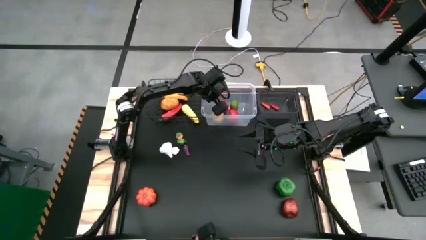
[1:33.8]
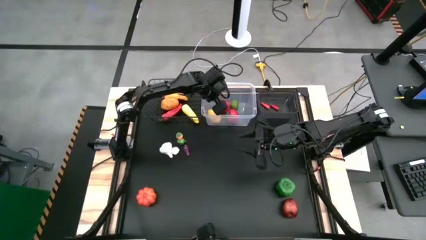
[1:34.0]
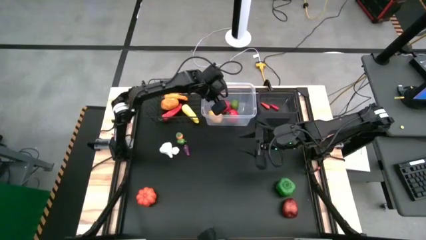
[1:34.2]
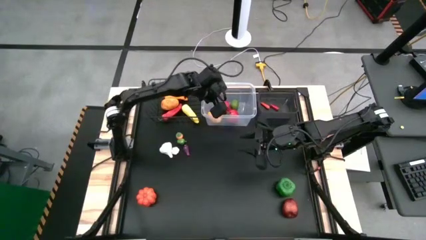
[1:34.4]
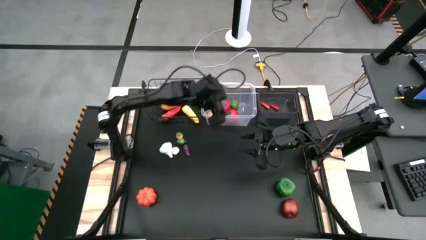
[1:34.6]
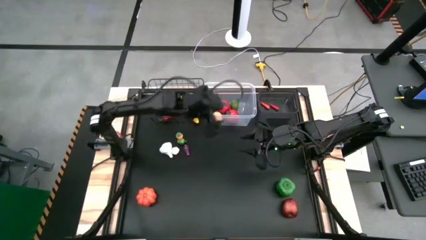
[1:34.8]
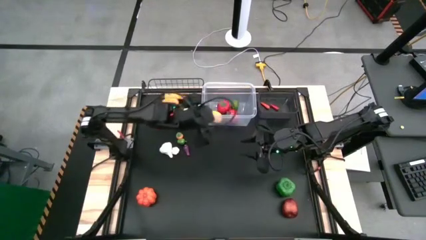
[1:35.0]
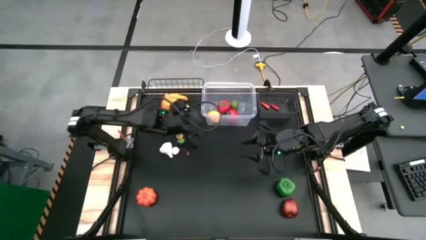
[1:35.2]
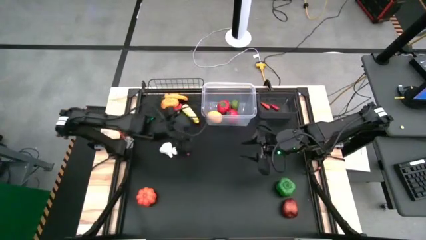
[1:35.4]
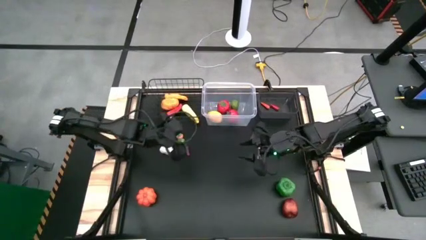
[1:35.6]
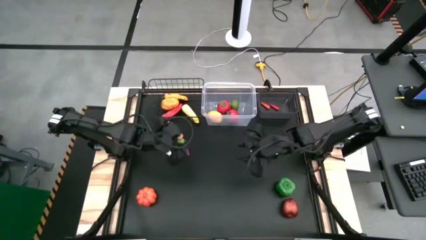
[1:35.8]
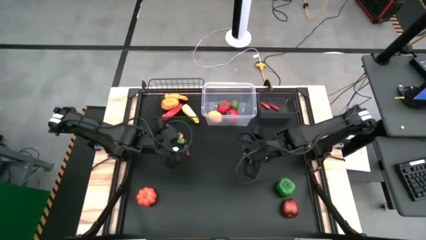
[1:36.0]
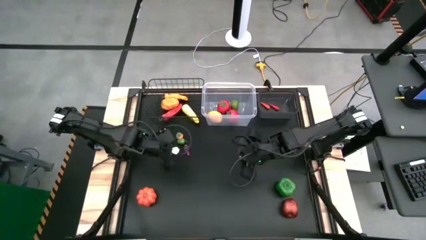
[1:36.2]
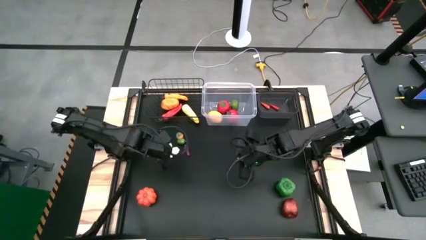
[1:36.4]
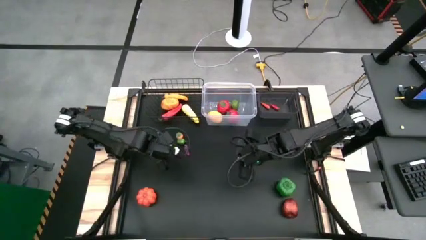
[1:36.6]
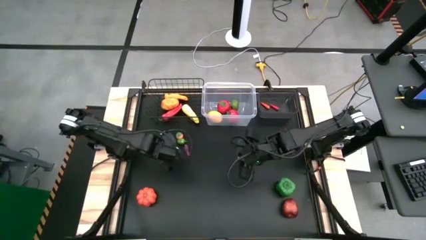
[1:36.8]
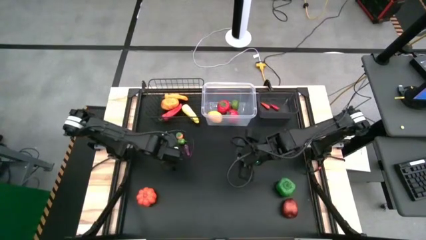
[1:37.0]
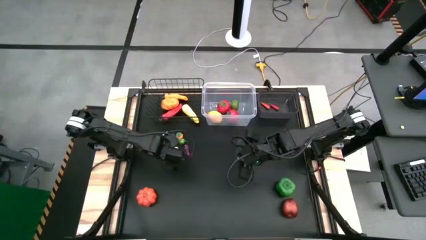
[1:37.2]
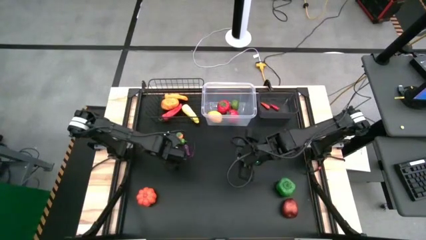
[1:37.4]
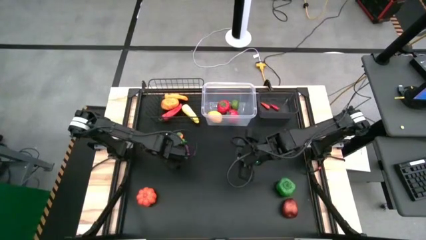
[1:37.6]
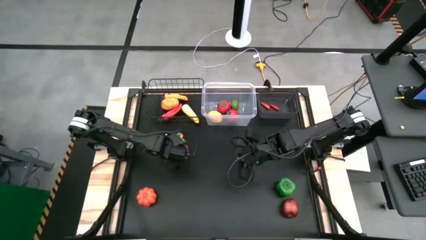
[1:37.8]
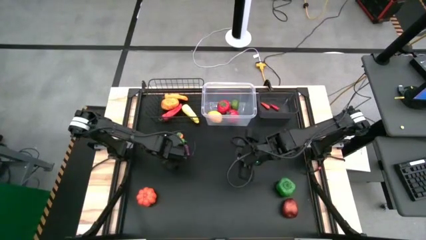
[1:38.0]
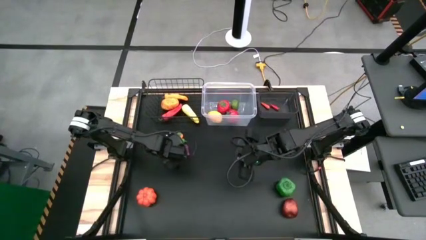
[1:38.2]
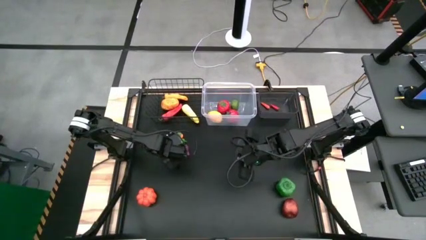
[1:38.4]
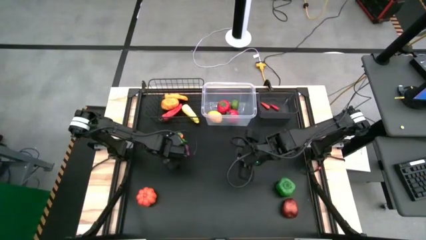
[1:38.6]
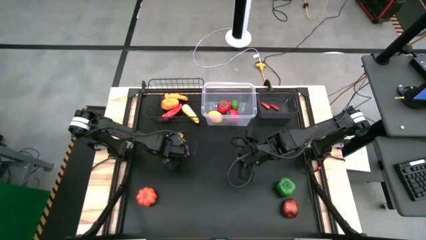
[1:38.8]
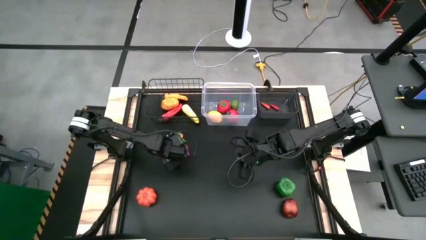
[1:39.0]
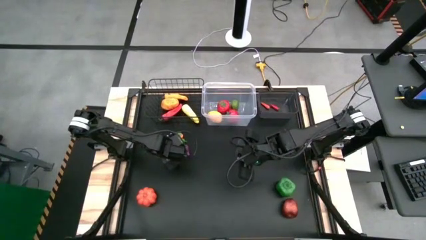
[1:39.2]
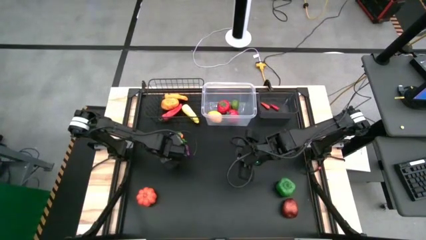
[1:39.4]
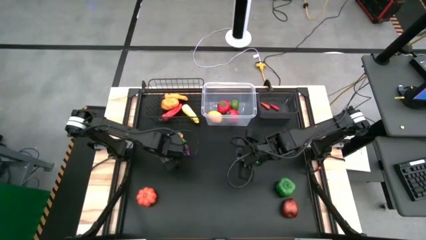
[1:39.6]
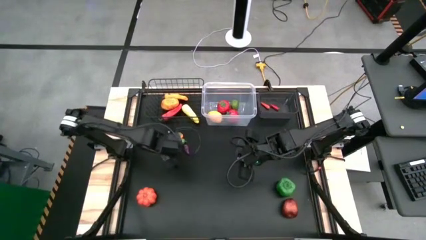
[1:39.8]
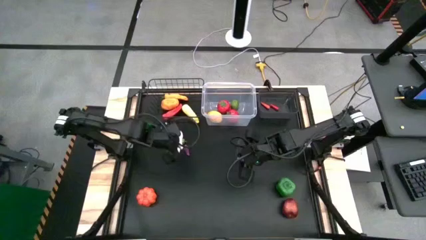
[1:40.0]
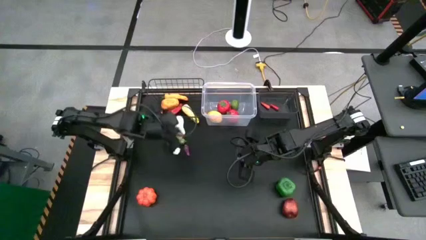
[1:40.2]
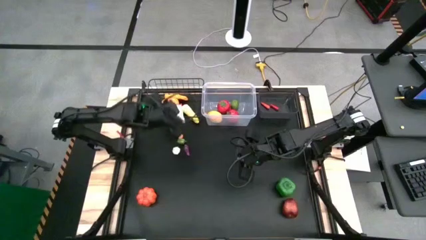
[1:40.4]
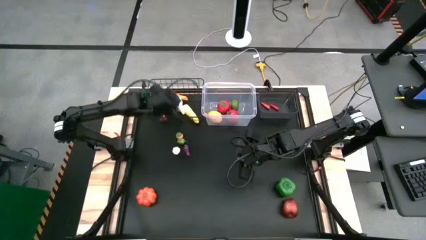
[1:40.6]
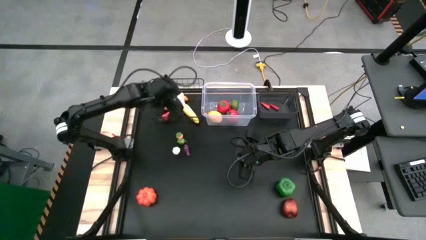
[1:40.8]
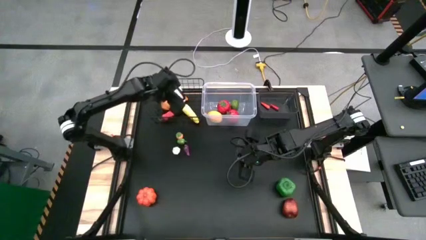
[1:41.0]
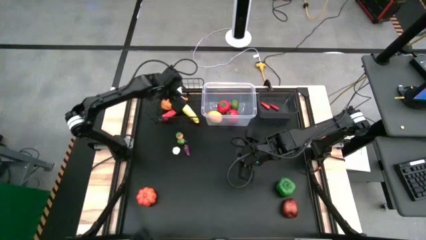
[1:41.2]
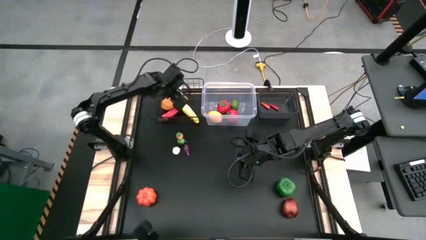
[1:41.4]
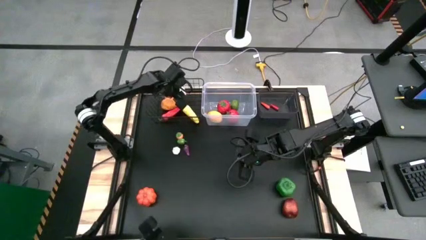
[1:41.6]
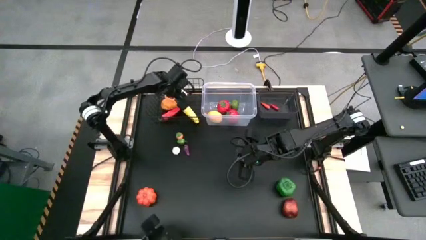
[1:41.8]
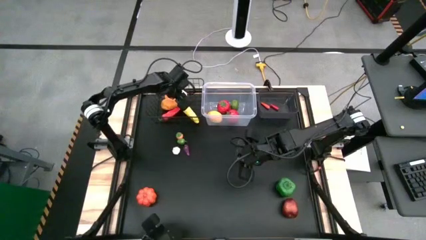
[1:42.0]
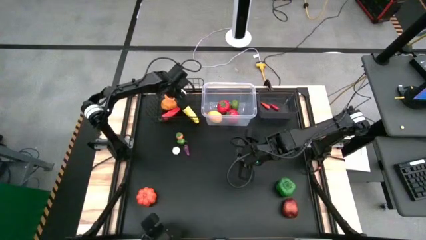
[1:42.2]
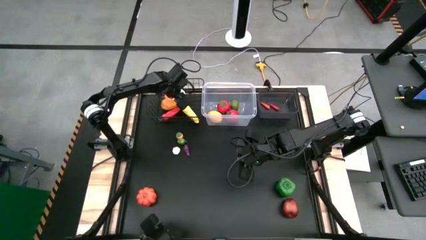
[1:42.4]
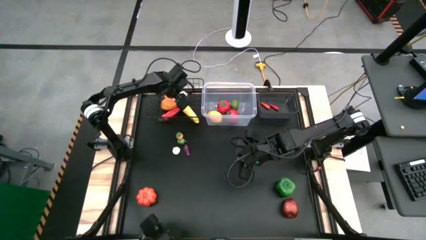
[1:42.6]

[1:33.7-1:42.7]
Task: Sort produce into baskets
Put the left white garlic into the wire basket

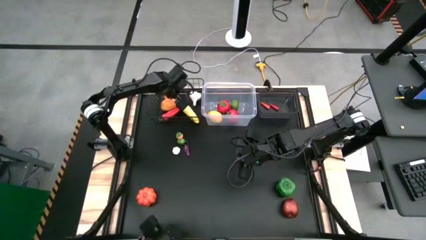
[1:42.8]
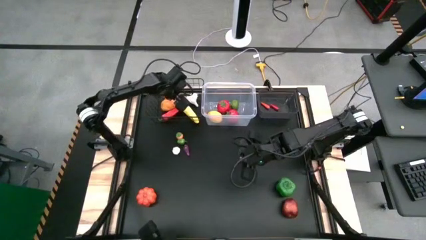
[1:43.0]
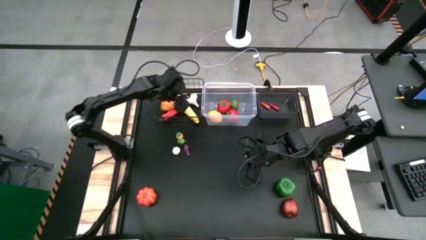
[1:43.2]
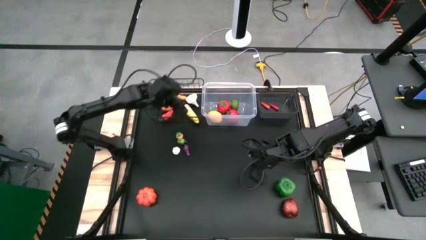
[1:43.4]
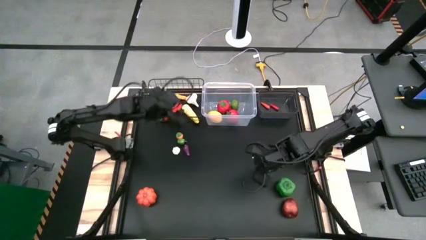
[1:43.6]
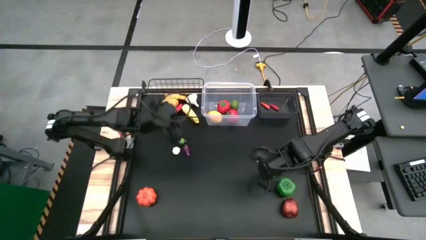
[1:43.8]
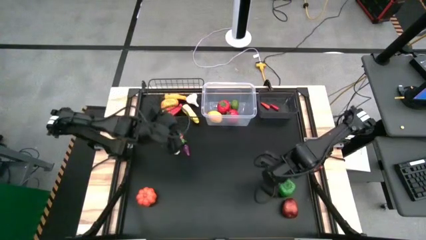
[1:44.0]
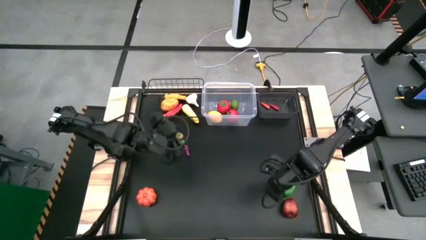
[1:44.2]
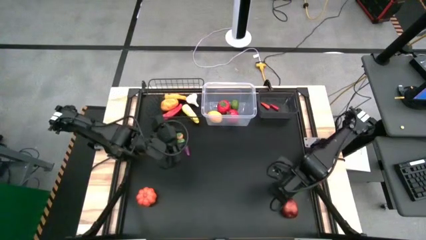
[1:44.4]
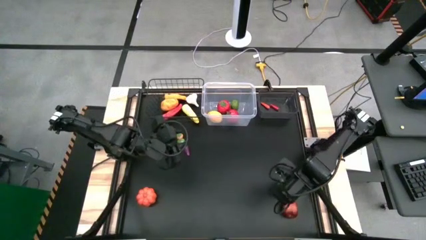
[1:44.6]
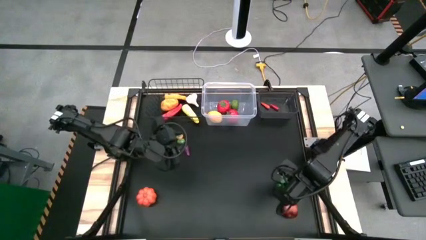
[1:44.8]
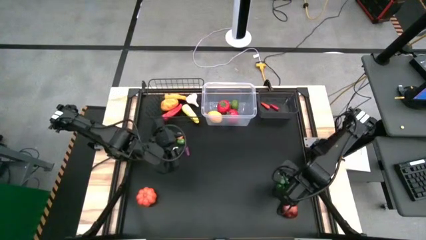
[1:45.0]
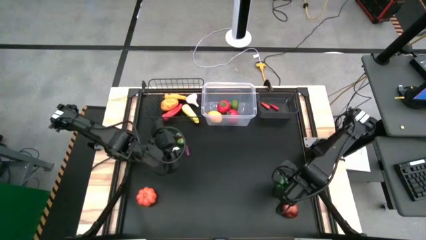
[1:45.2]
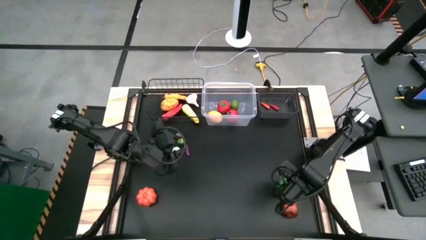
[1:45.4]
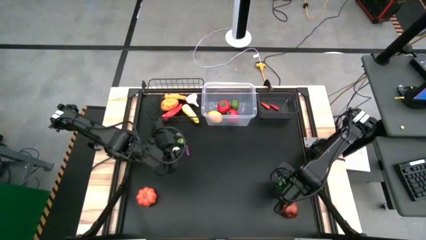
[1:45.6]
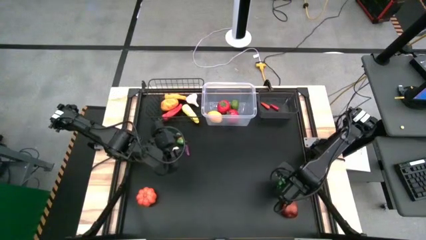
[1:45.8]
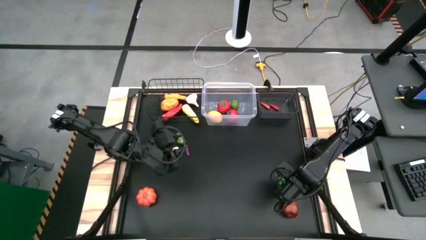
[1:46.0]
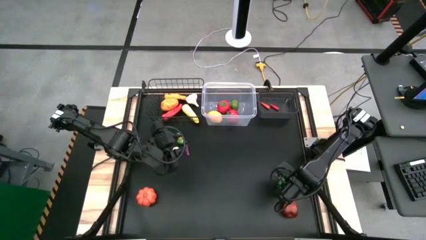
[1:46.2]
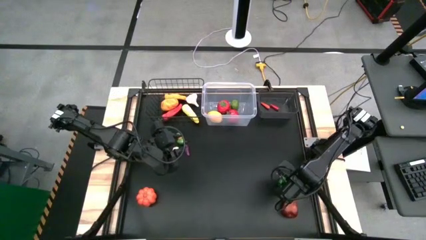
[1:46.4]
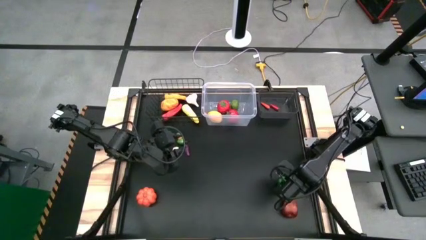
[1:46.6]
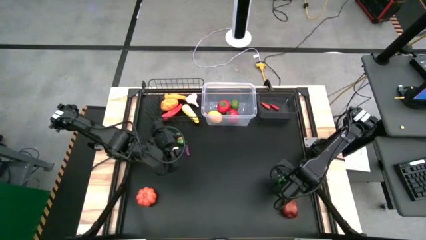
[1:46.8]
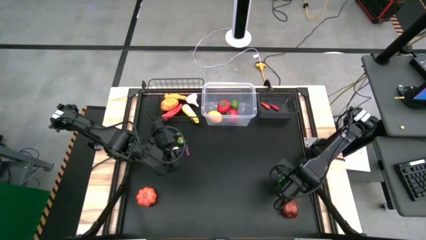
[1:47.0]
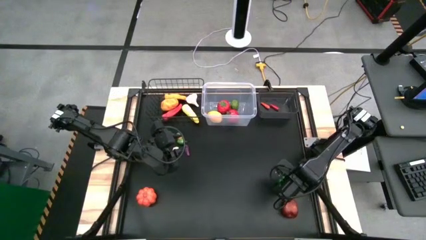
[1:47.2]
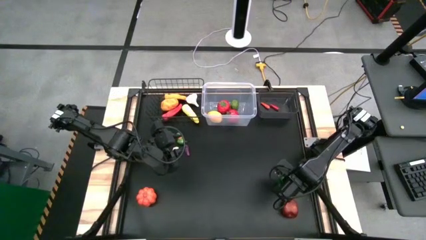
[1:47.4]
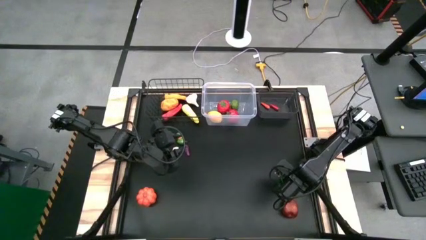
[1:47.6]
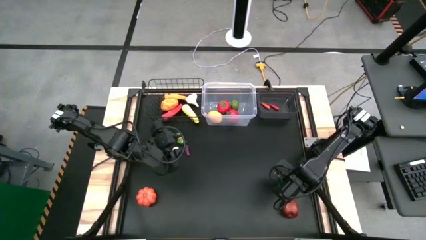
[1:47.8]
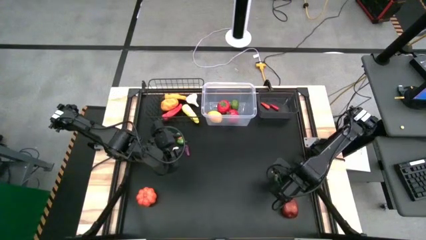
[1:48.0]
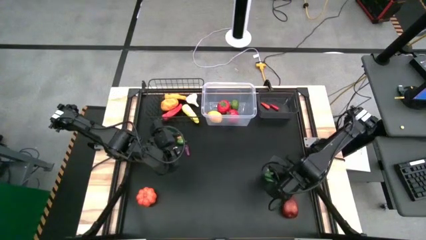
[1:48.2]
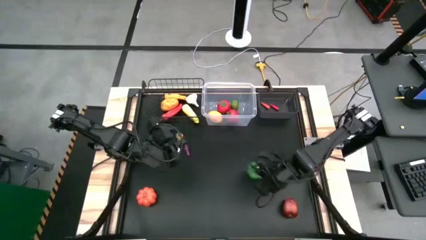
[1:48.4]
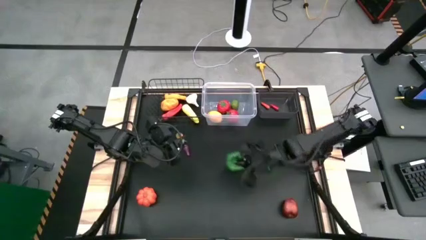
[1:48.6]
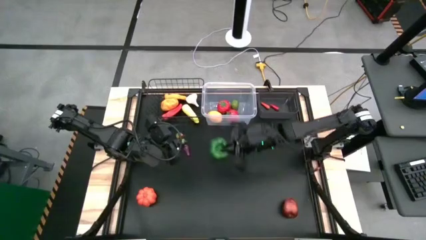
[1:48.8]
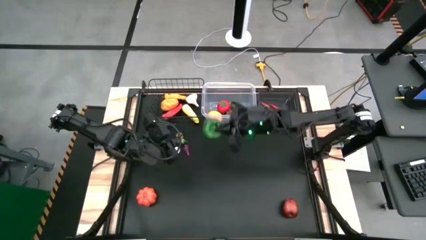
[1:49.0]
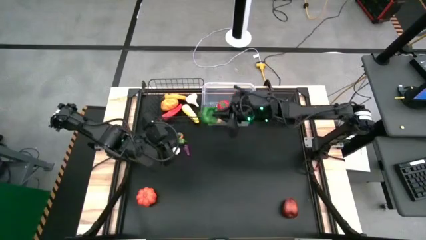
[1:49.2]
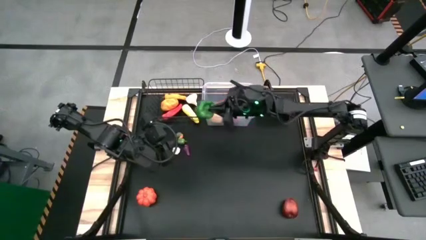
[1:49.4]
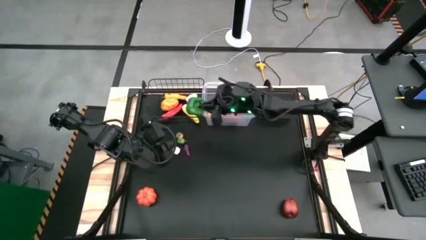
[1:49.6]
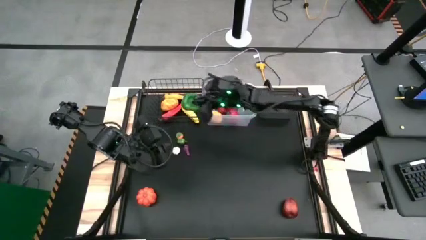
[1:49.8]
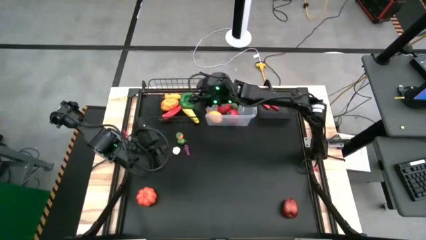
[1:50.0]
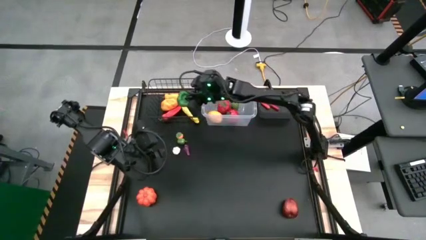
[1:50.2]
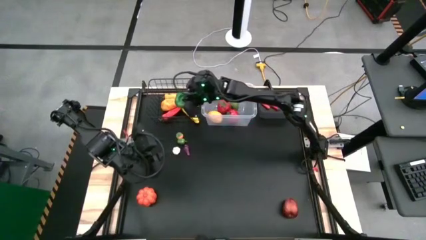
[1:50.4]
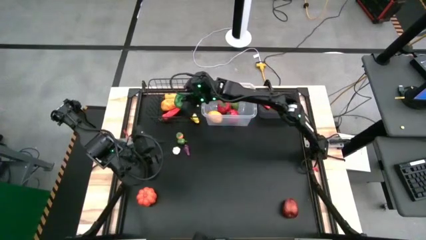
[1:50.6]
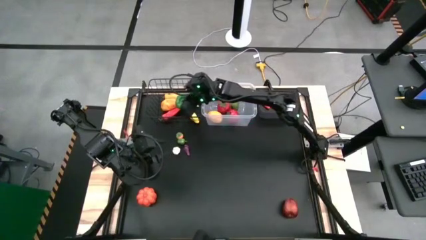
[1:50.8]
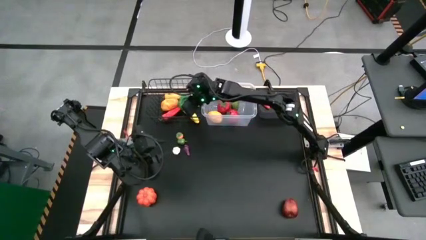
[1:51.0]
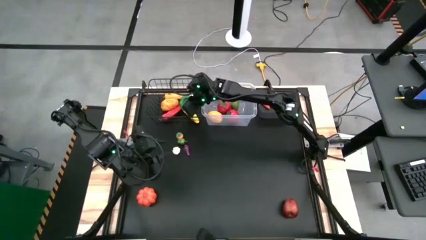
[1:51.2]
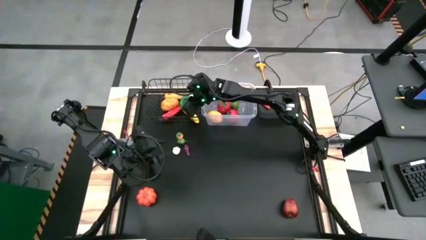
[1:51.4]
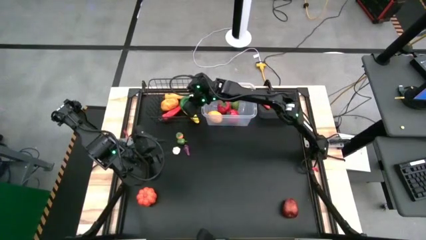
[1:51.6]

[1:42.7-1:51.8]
Put the large green bell pepper into the wire basket
